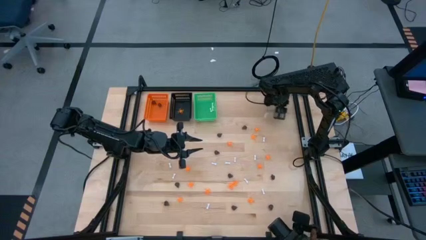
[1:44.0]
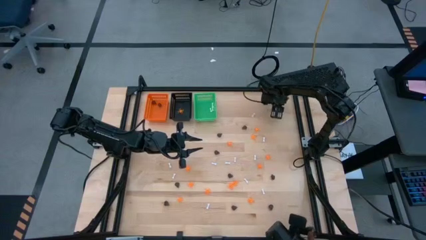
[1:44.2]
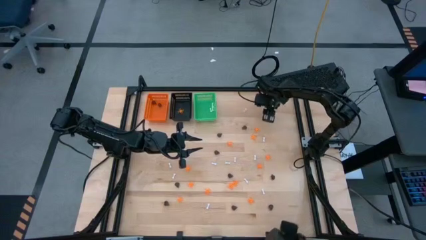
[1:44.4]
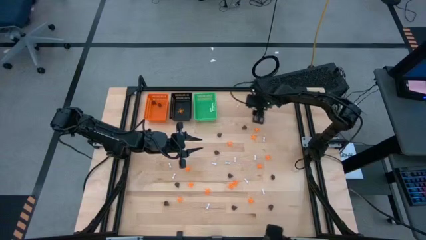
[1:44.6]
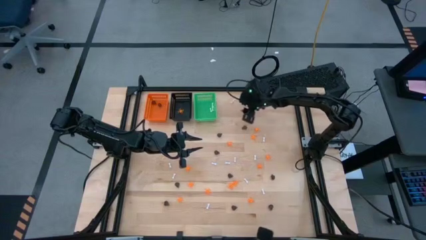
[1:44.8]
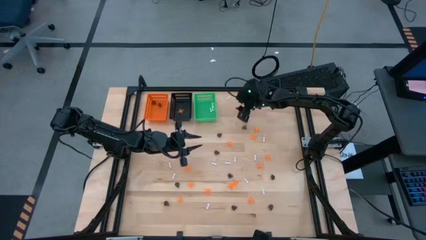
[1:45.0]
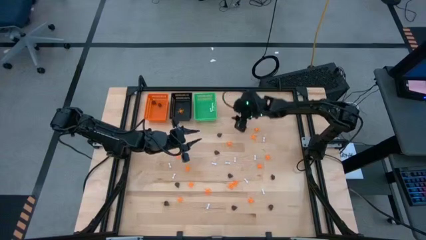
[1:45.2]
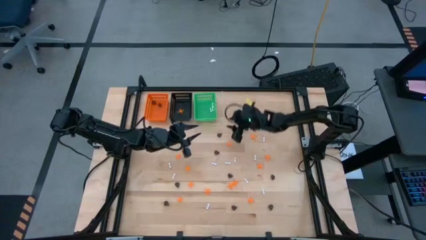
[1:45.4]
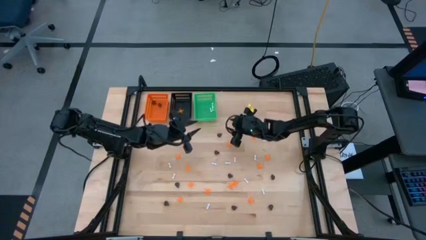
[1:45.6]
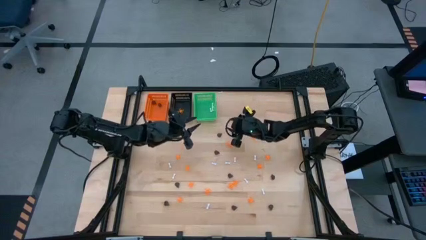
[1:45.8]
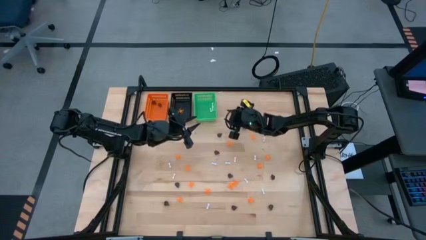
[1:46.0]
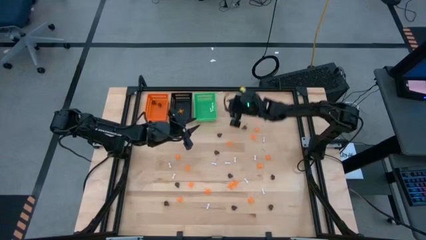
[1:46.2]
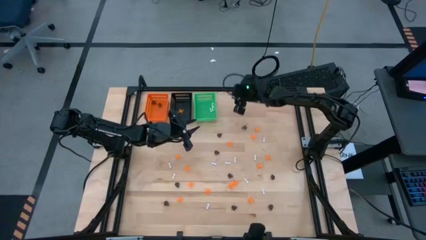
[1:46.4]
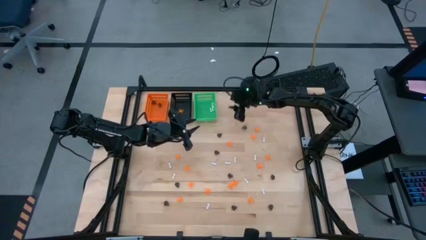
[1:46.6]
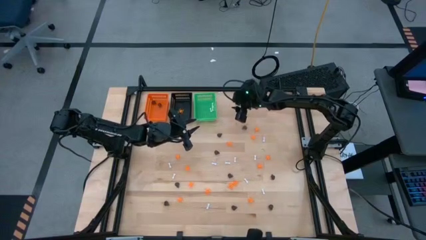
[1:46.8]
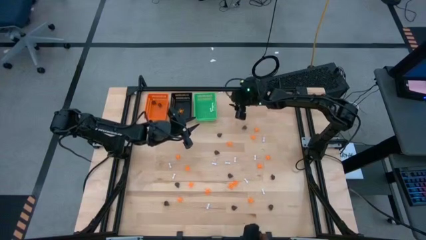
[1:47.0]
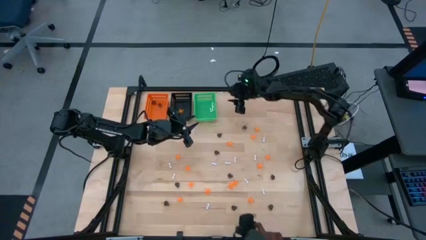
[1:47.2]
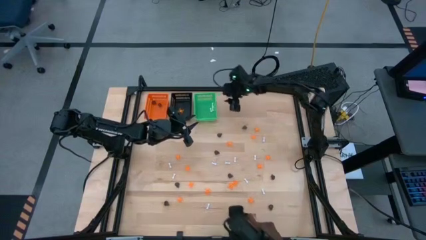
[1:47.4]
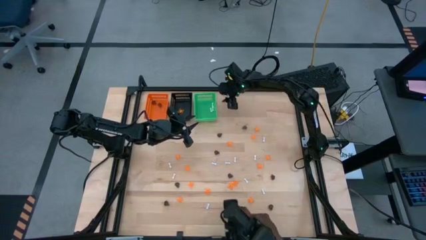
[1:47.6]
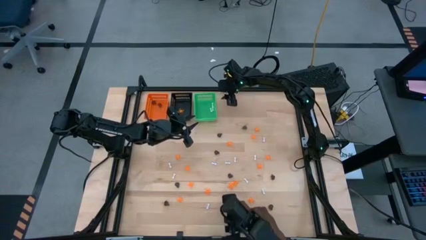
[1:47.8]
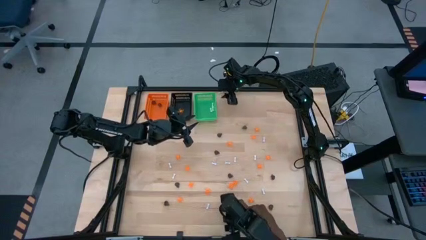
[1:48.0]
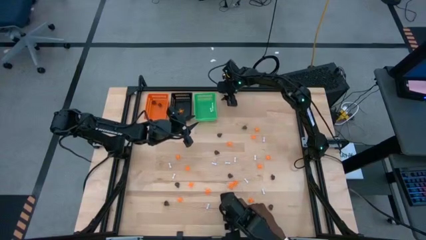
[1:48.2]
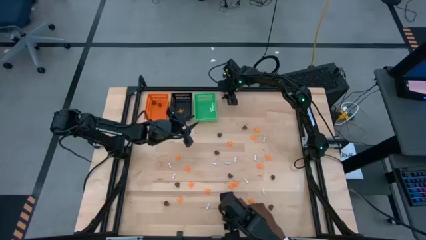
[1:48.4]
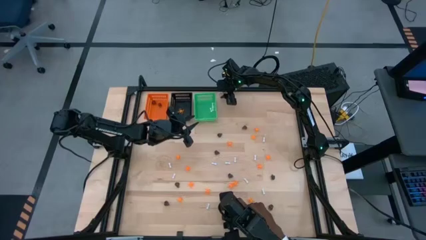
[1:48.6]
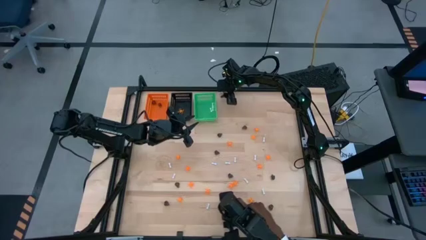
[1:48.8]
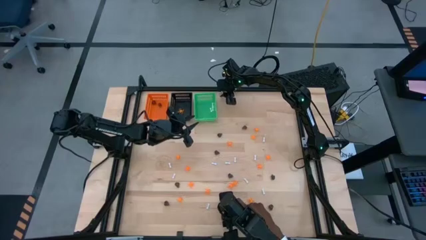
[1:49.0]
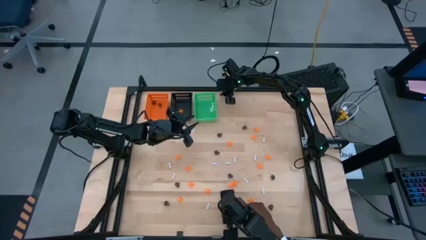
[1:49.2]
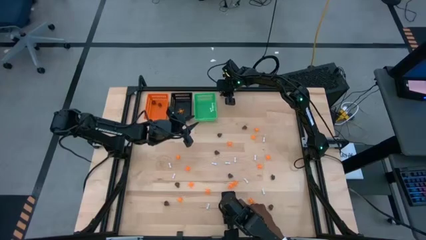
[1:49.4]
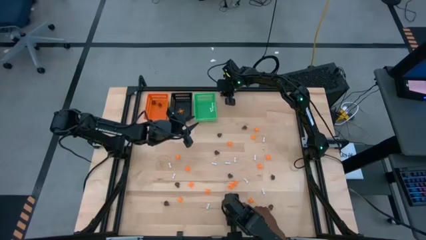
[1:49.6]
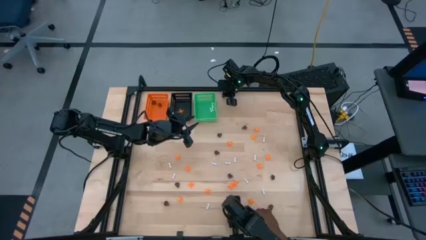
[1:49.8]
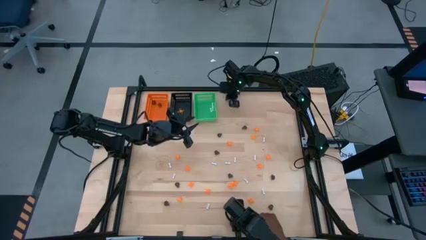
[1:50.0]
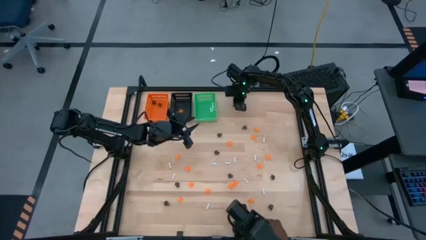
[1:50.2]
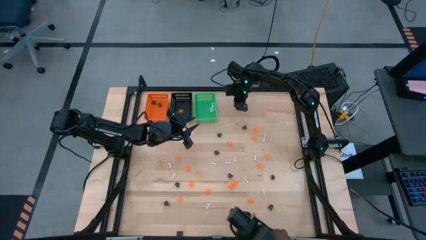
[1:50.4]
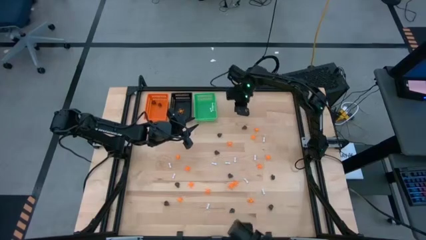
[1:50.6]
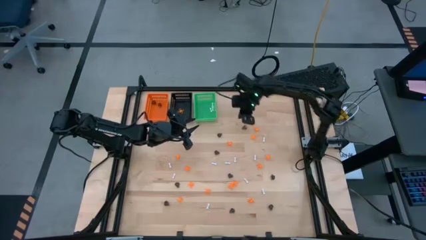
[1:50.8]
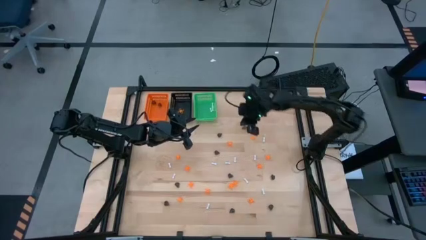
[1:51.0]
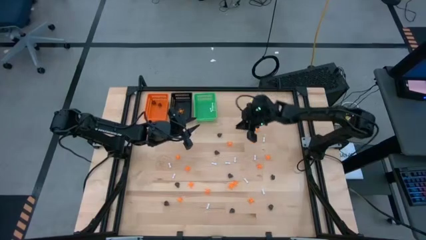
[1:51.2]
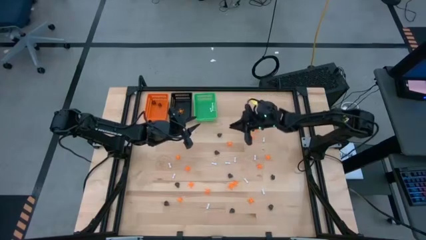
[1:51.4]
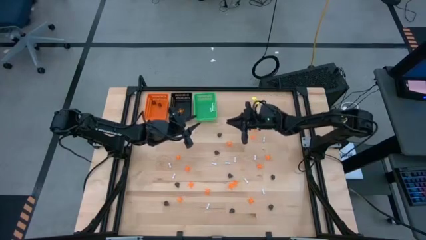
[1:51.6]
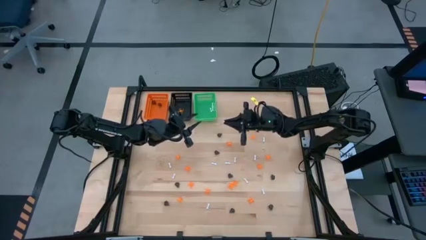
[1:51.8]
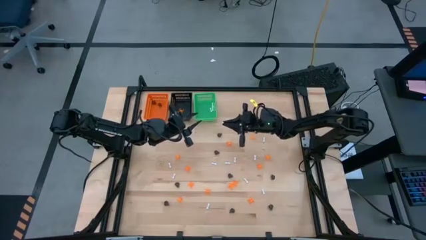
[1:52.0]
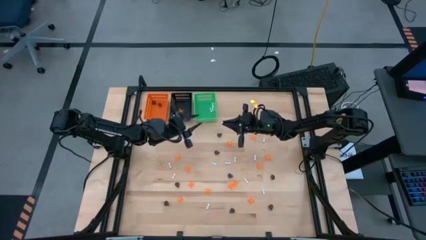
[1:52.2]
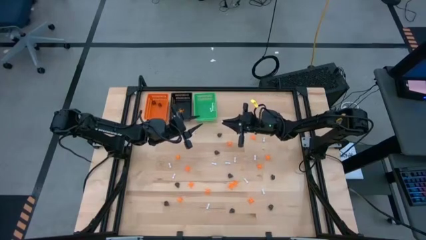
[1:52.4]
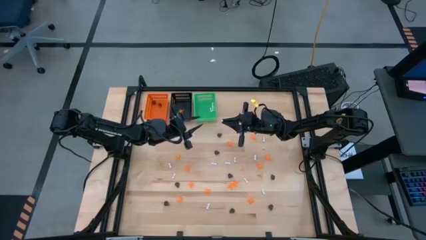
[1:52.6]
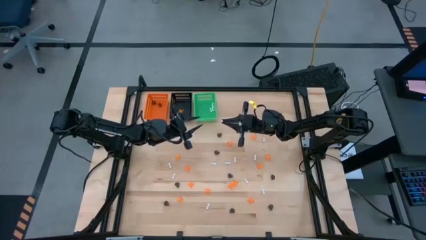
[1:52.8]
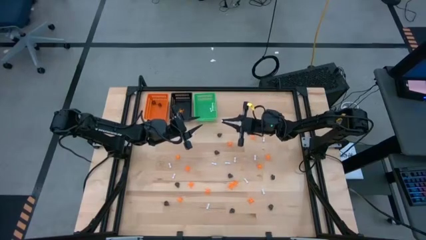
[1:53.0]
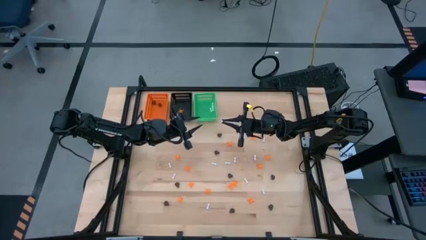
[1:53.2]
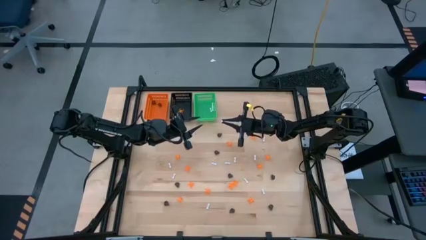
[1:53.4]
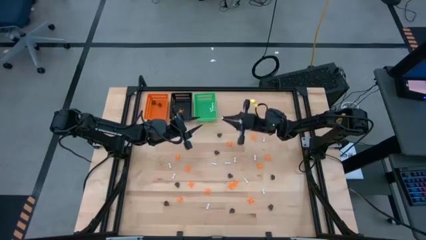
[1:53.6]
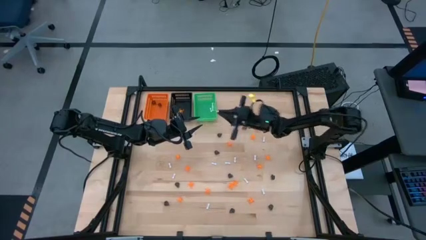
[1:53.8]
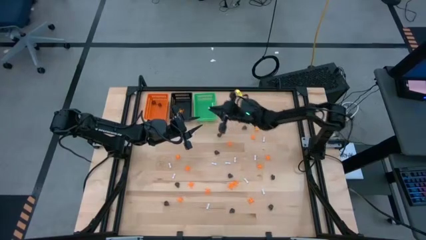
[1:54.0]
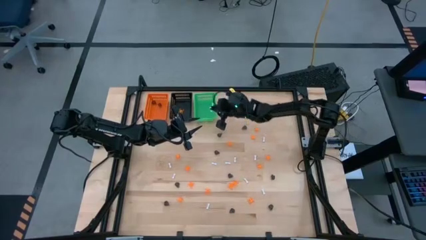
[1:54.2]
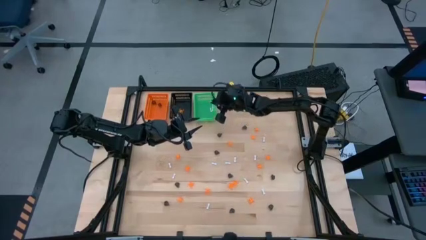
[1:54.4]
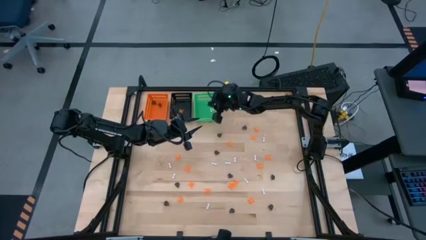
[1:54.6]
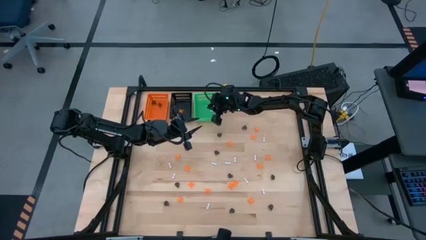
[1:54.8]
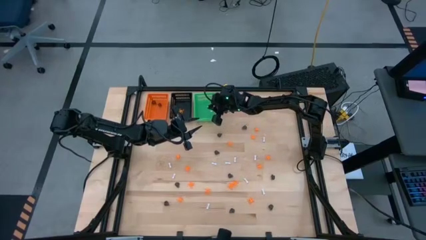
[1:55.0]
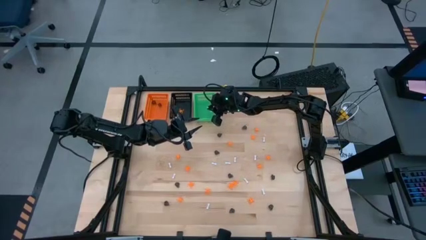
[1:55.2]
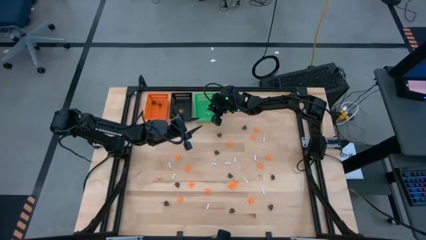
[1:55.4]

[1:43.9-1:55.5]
Task: Sort Halloween decoration
Put the white bone toy into the green bin

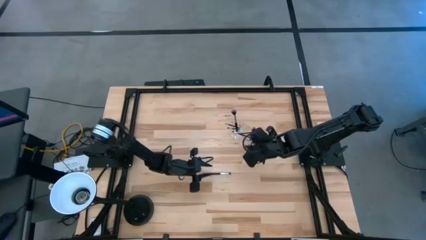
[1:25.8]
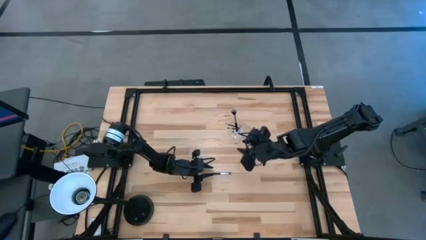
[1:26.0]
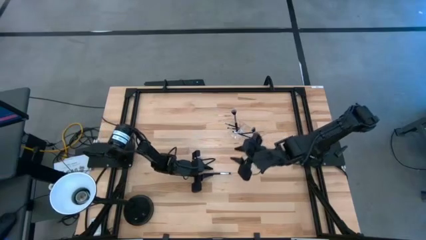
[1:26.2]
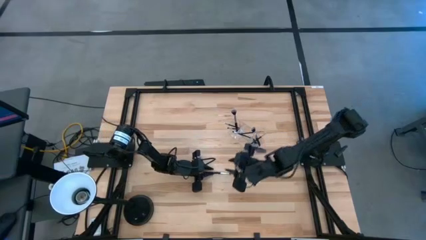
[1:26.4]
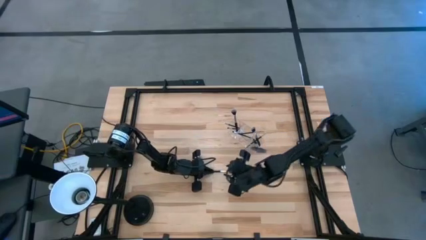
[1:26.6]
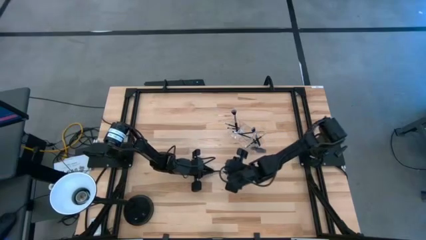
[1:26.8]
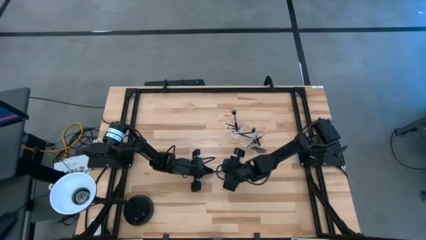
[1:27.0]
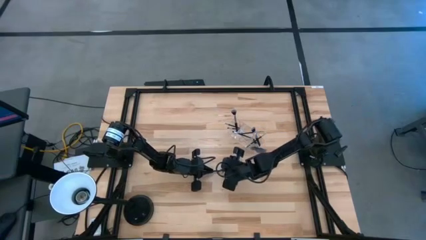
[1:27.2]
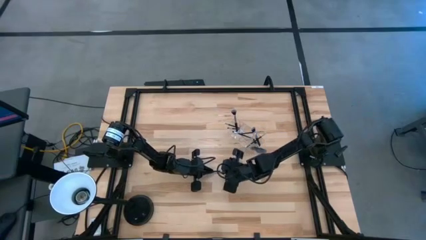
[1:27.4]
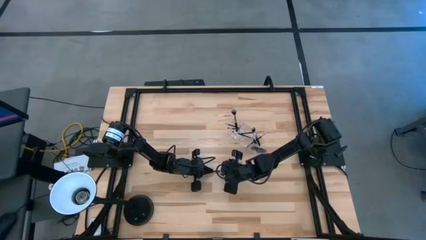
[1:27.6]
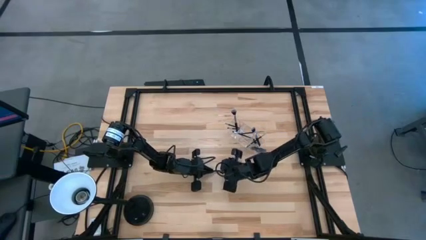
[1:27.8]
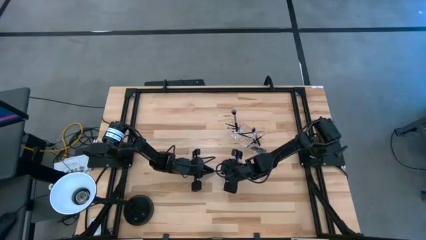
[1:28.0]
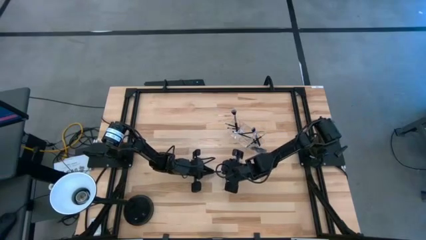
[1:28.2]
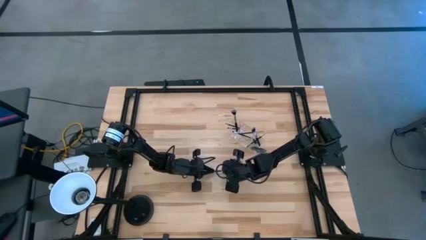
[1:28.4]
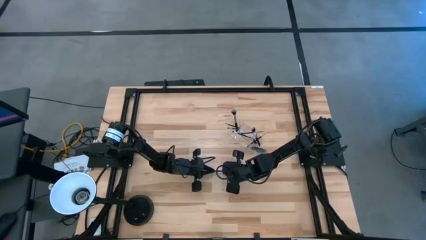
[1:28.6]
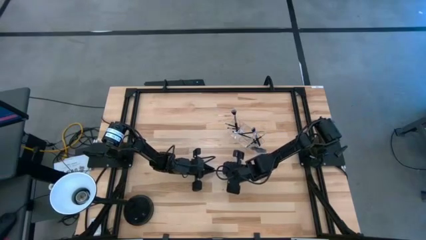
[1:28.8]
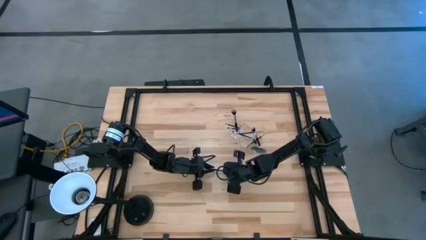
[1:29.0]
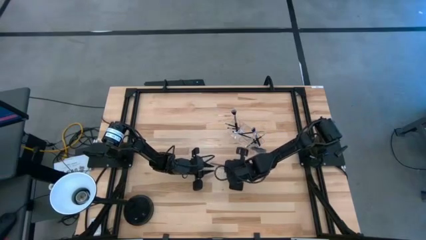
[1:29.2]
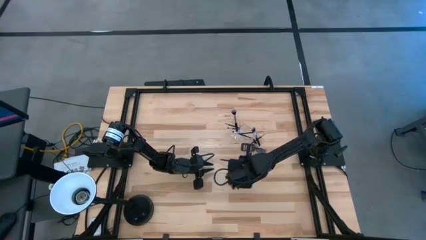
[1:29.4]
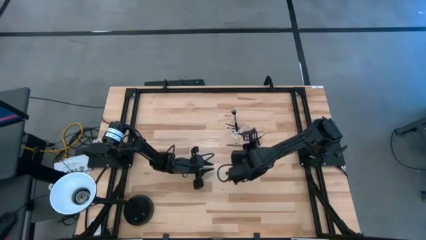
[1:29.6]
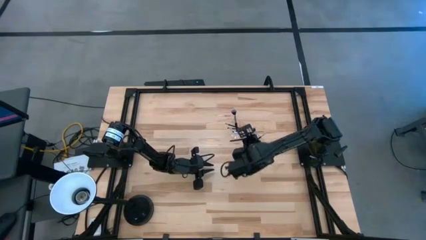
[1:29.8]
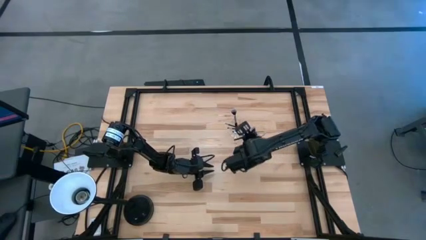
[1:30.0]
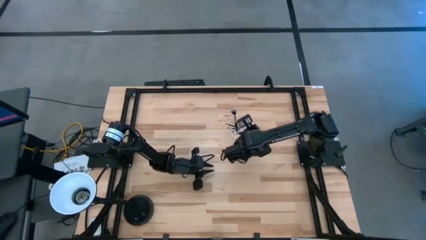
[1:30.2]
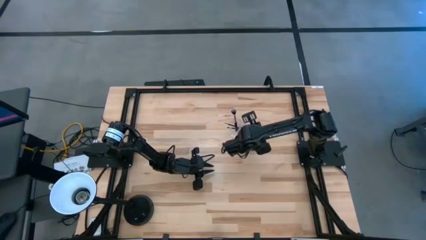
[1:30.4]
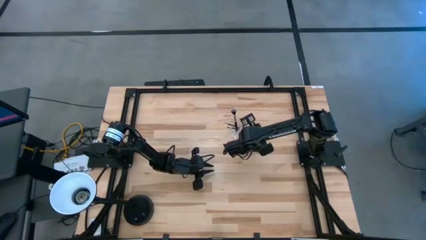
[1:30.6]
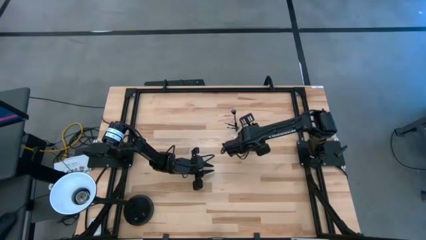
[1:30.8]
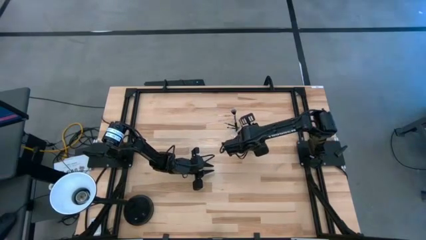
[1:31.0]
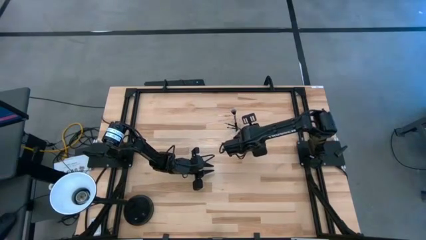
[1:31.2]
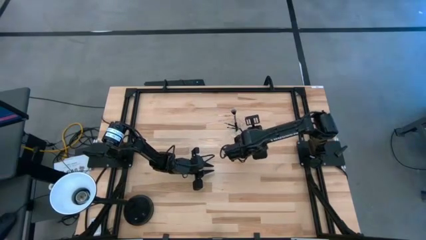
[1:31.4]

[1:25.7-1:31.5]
Task: Put items in baskets/containers
Put the eyeshadow brush into the transparent organizer
